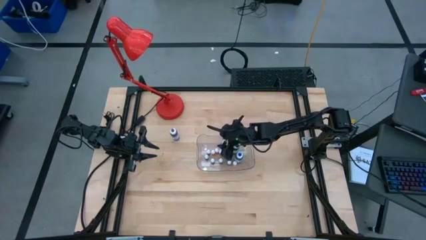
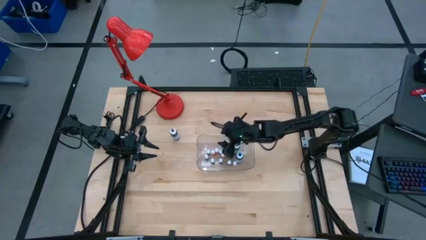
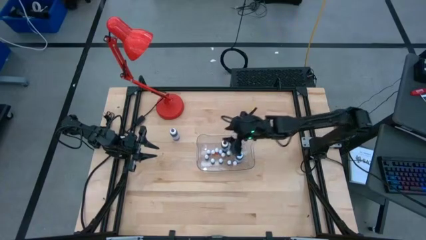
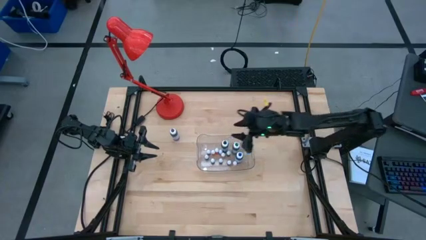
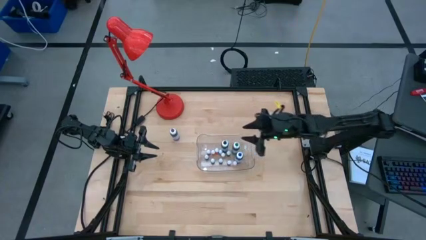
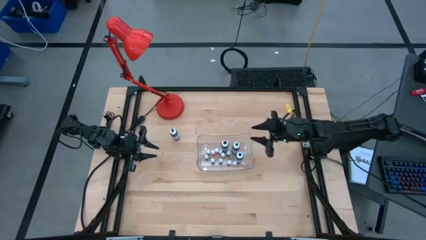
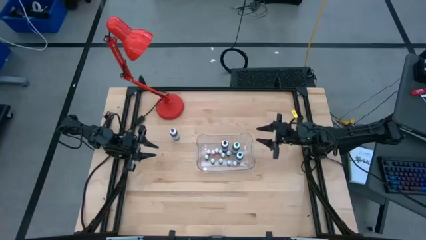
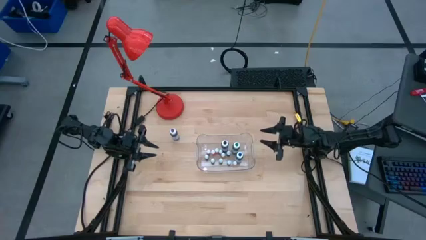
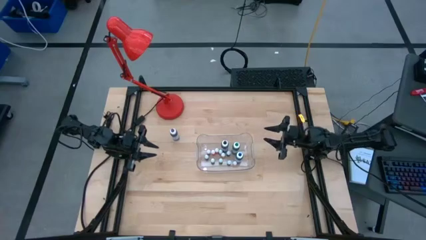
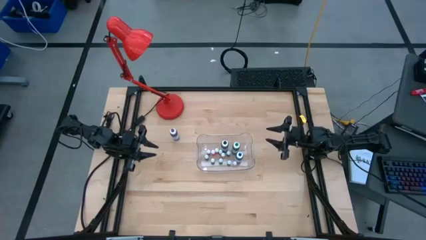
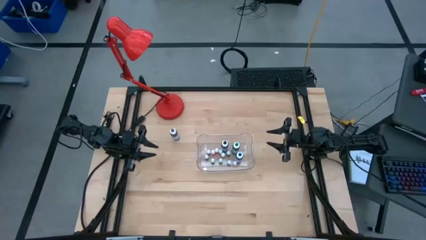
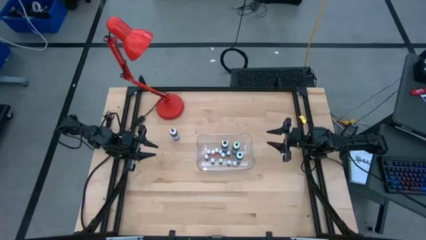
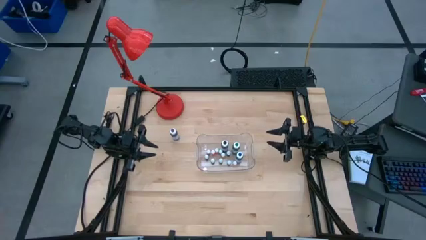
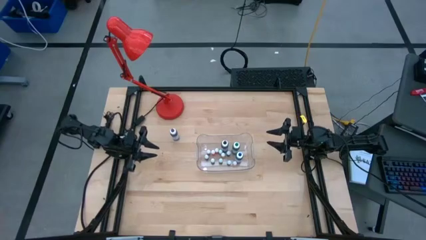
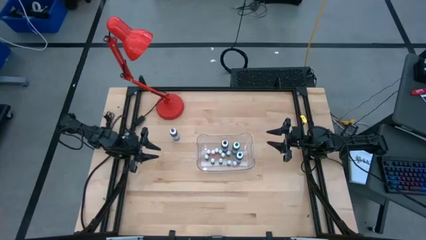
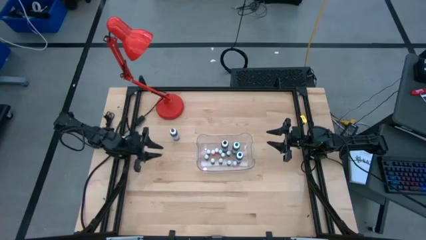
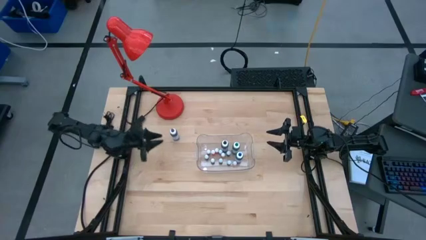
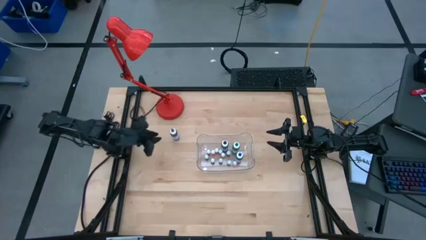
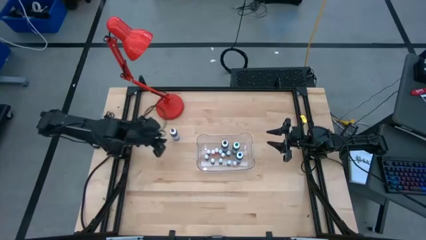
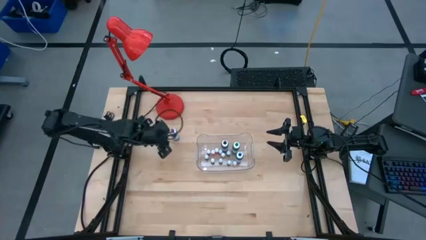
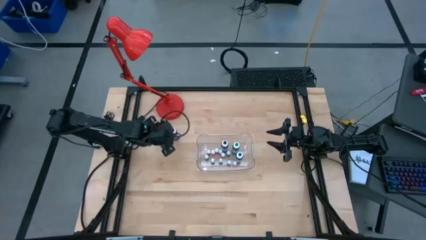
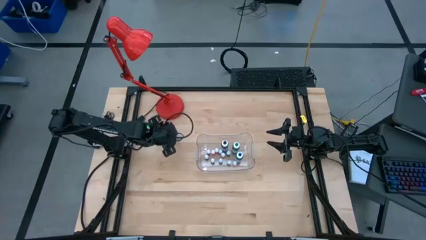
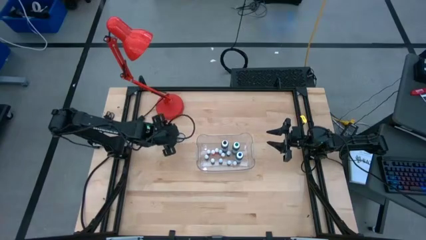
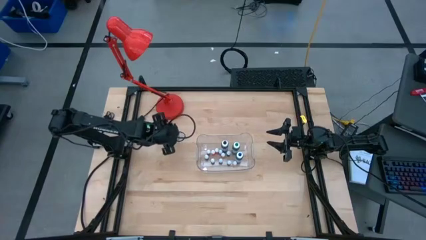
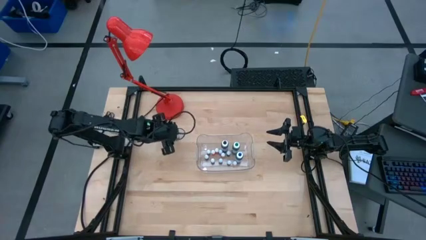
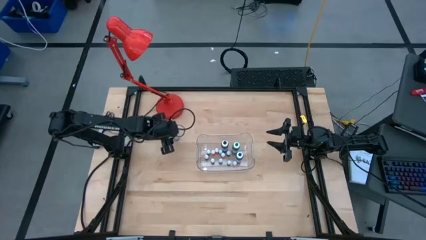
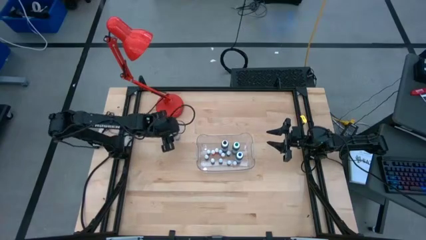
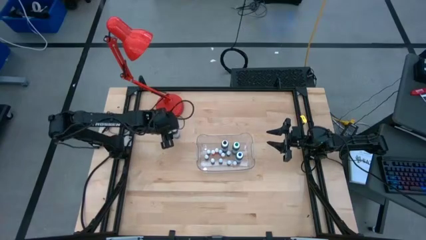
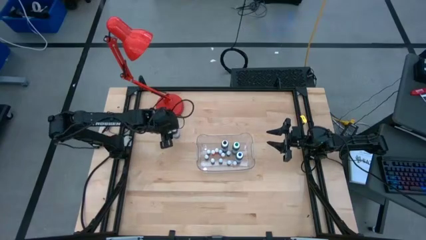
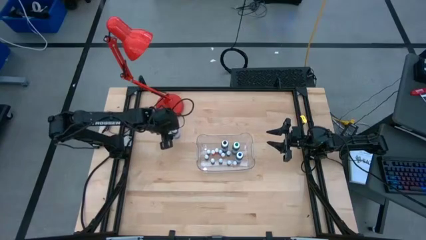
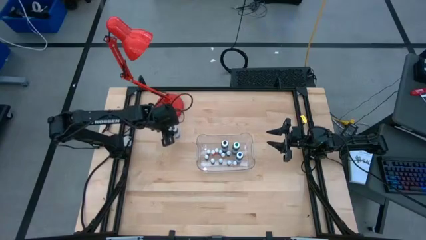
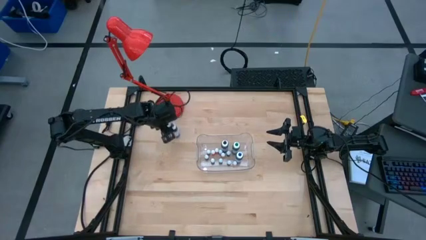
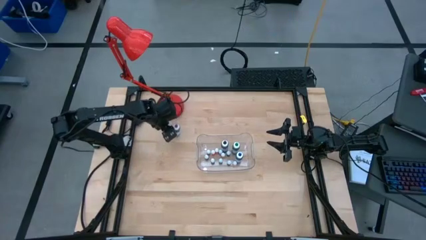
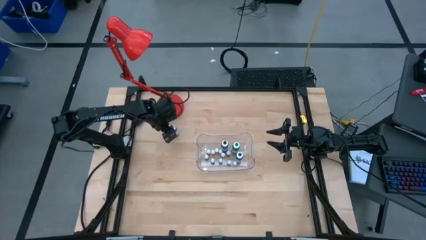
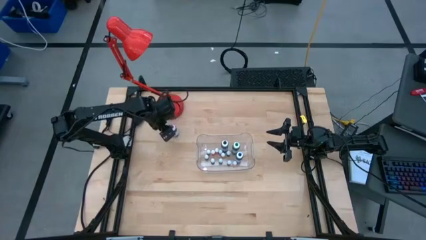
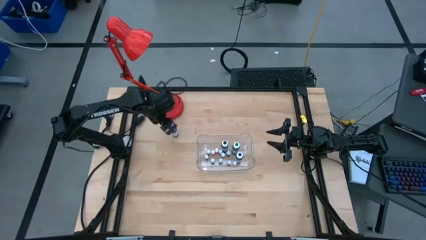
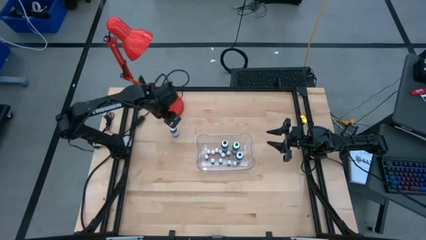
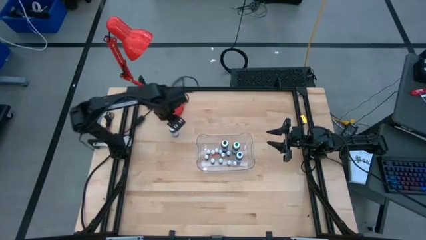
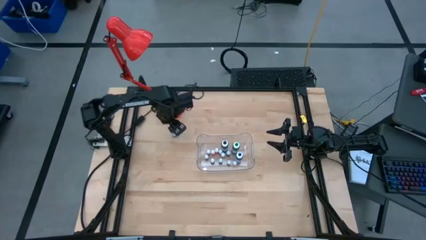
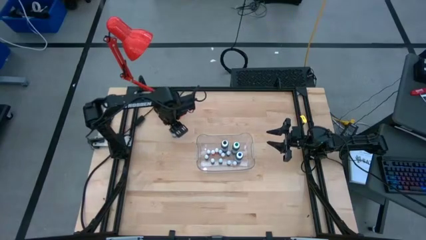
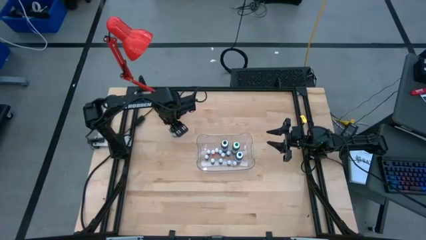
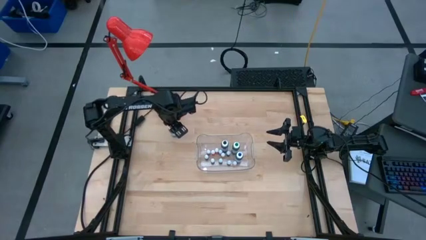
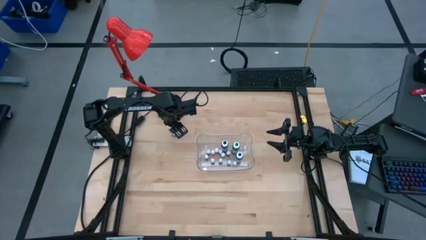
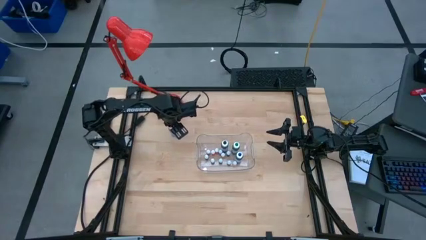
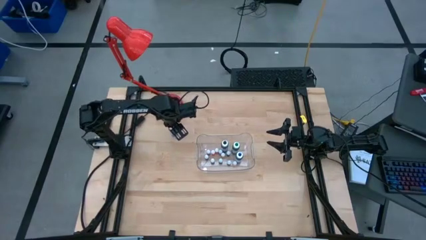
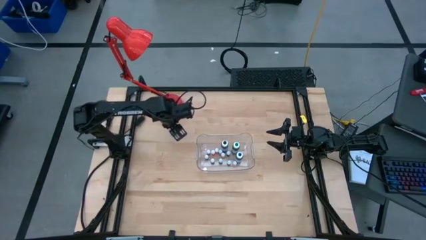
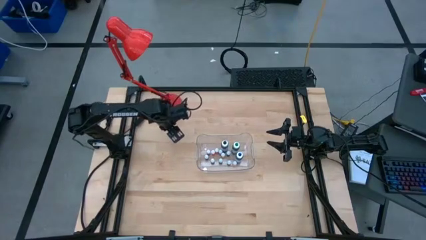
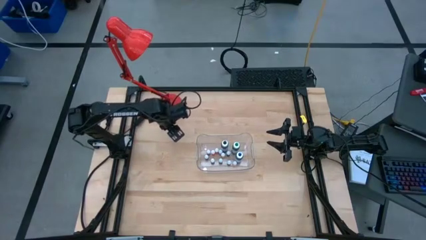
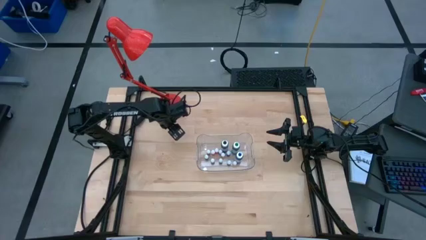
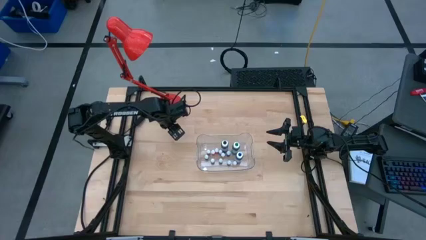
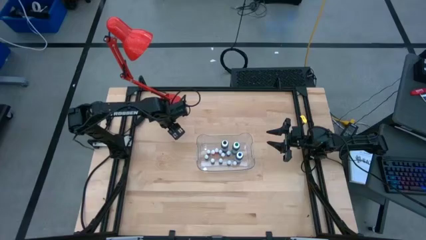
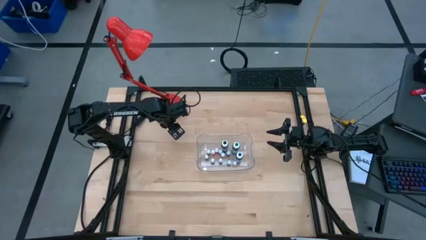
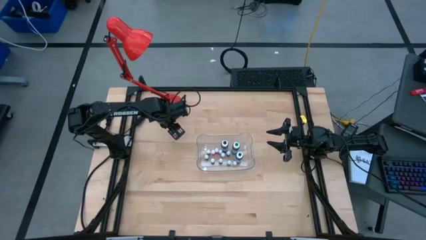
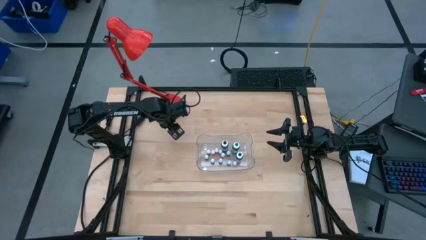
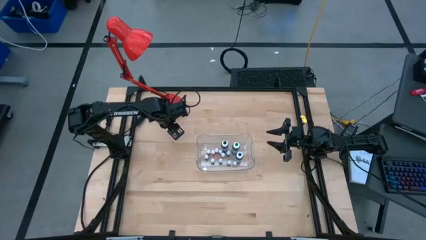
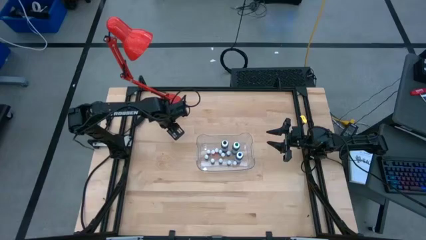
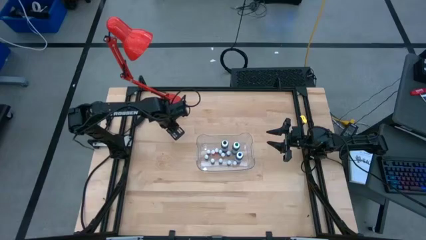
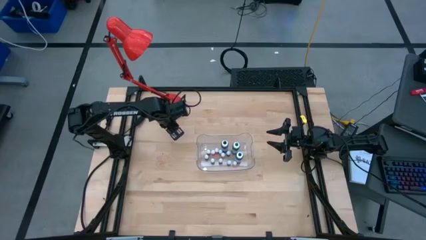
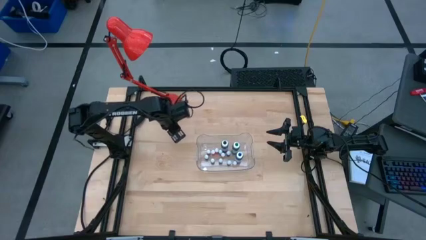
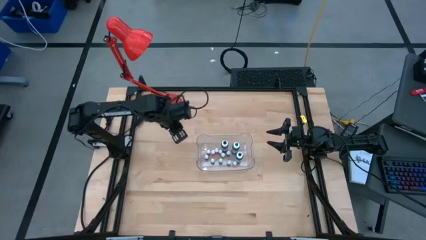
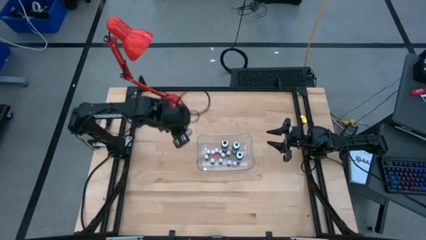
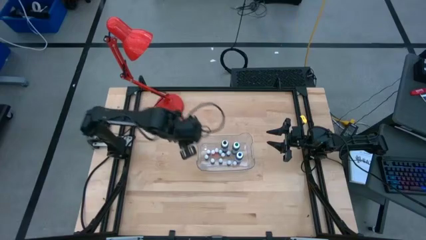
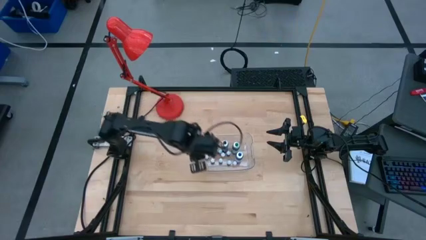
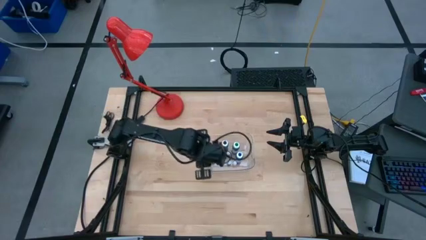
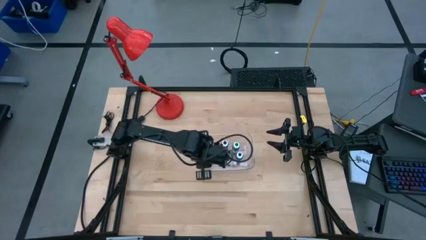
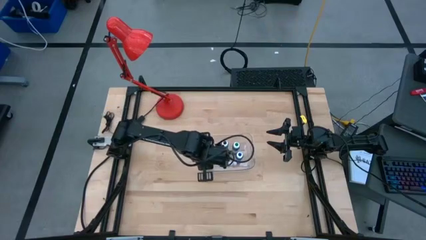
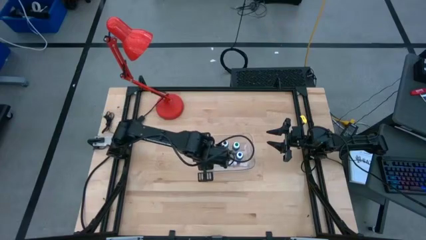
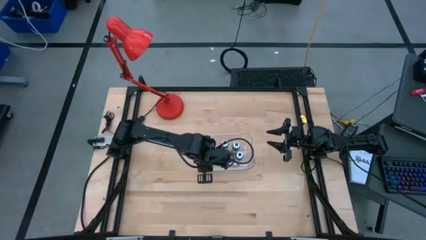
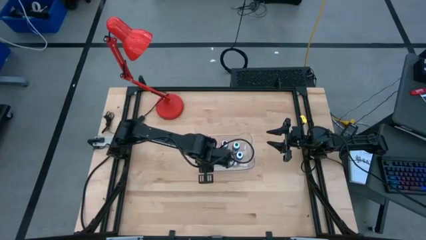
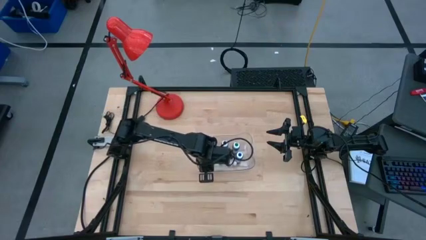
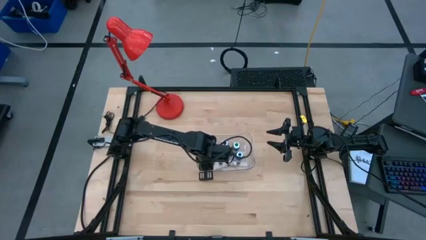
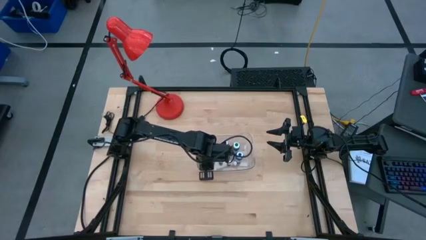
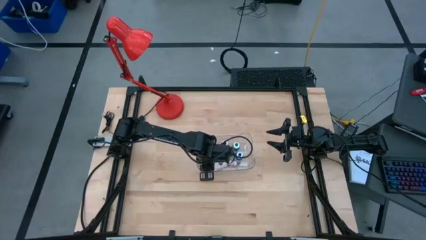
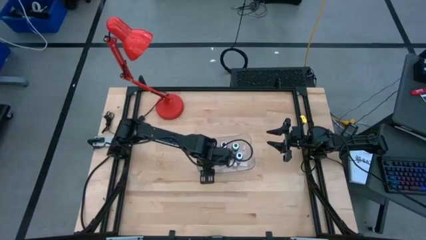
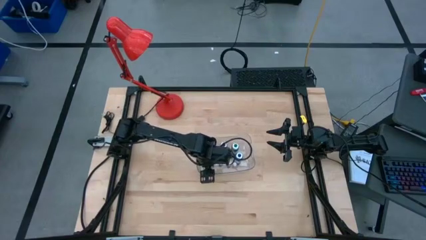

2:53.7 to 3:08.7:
Task: Pick & Place food coloring
Put the large purple food coloring bottle into the transparent bin
